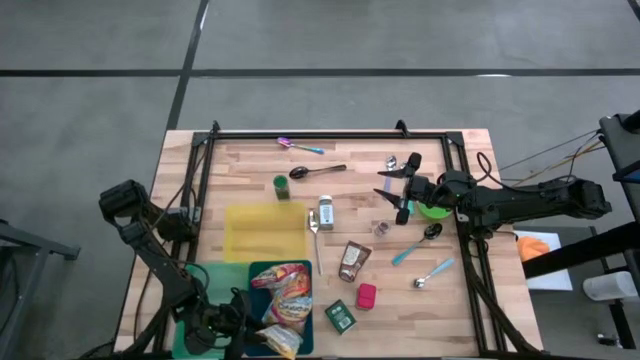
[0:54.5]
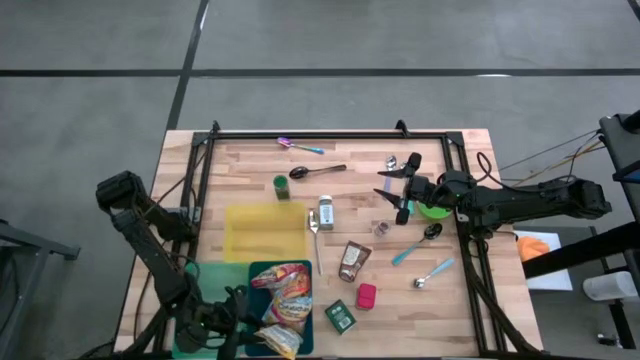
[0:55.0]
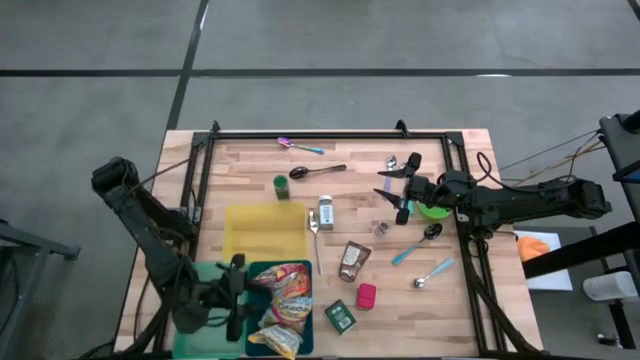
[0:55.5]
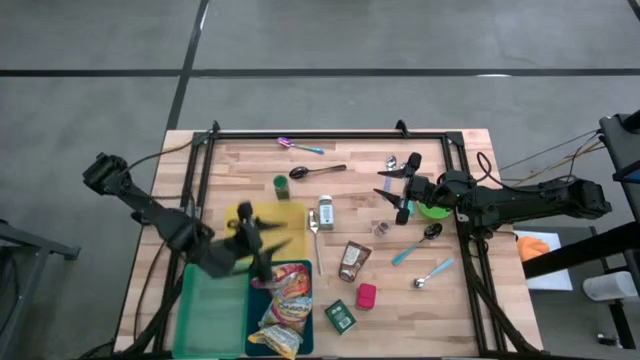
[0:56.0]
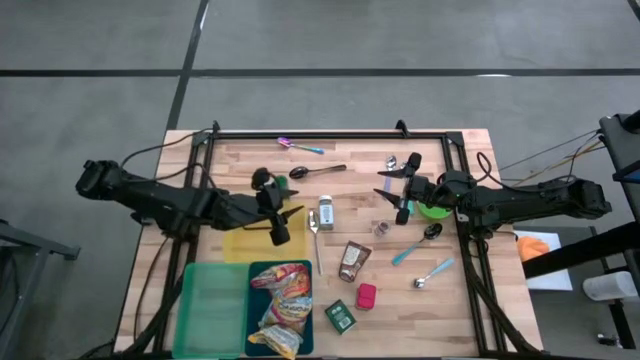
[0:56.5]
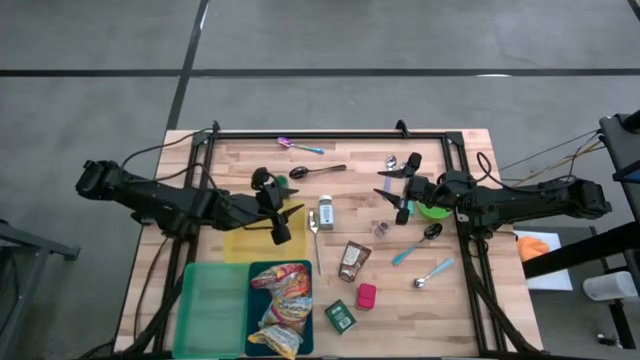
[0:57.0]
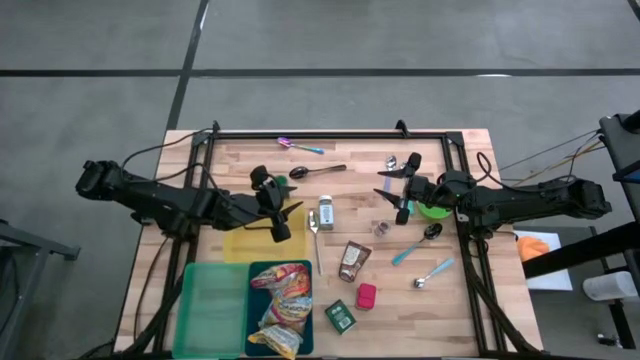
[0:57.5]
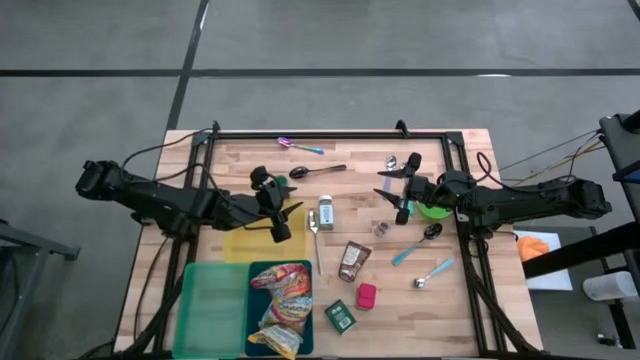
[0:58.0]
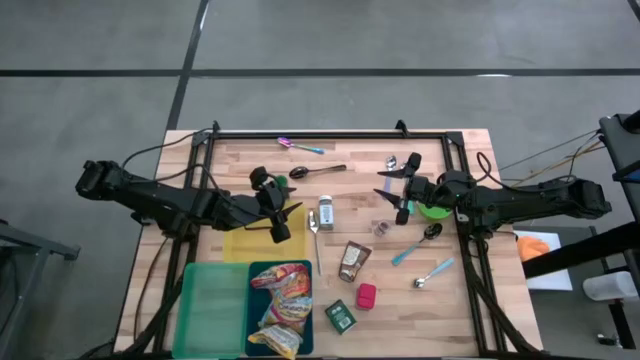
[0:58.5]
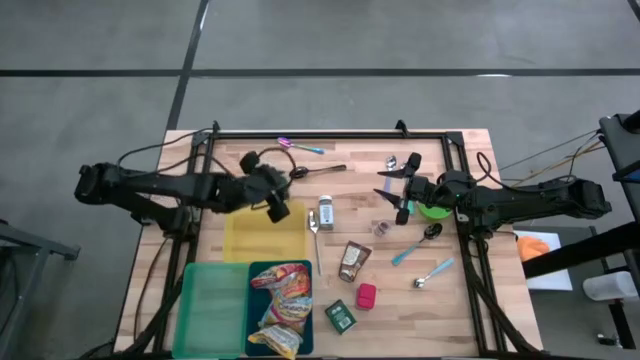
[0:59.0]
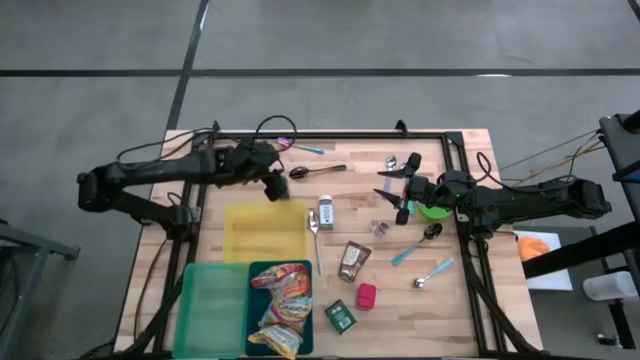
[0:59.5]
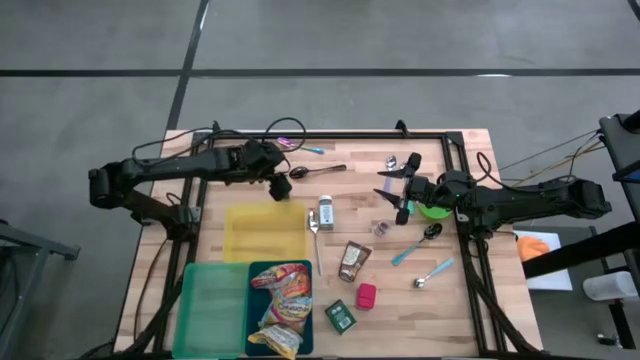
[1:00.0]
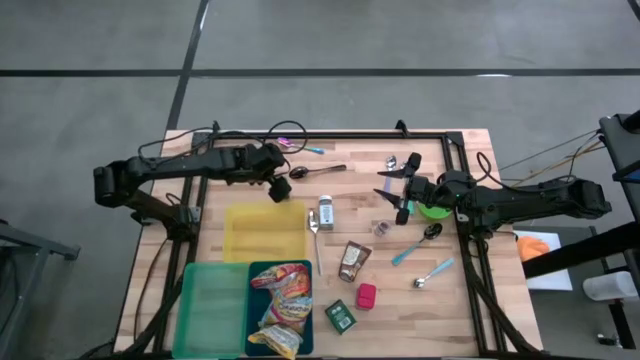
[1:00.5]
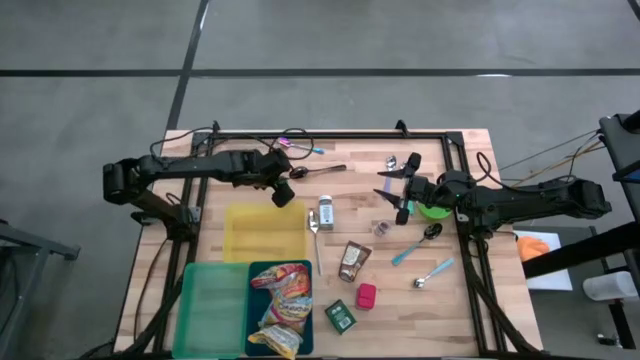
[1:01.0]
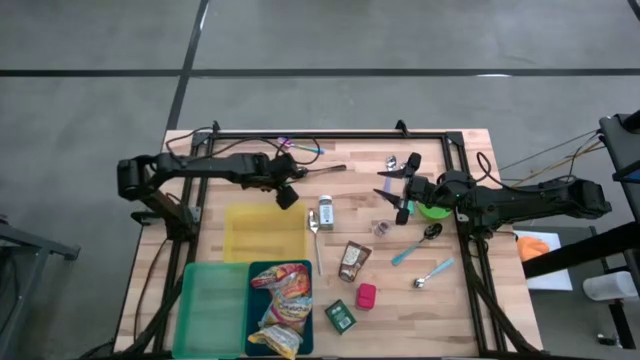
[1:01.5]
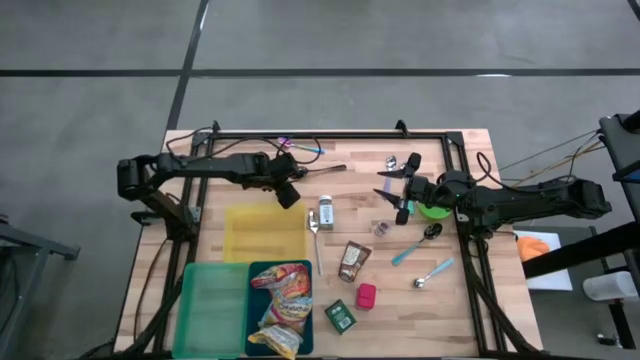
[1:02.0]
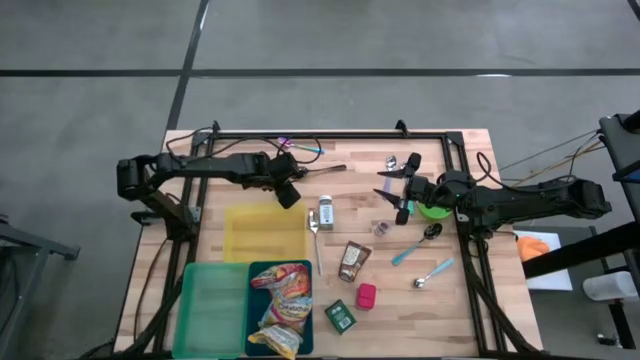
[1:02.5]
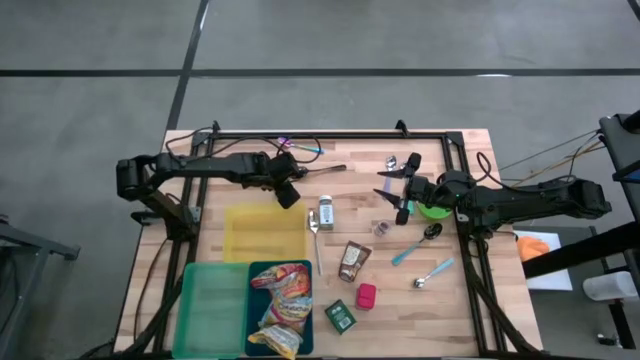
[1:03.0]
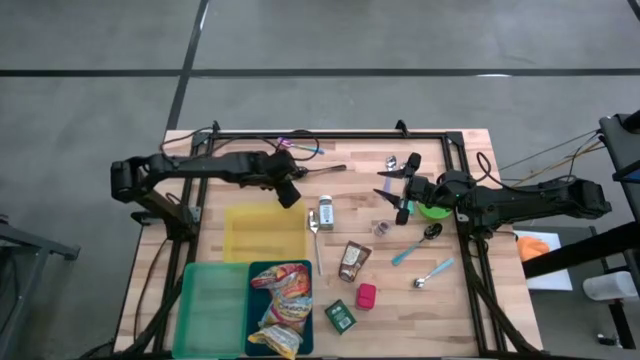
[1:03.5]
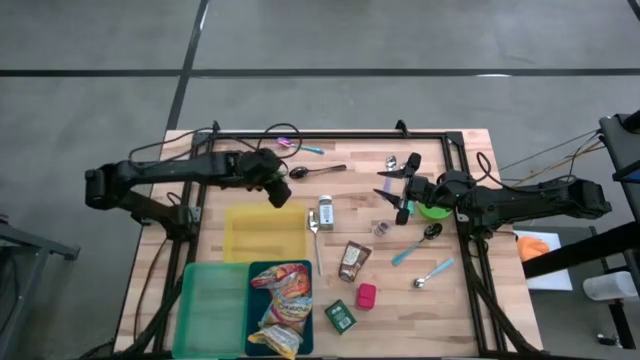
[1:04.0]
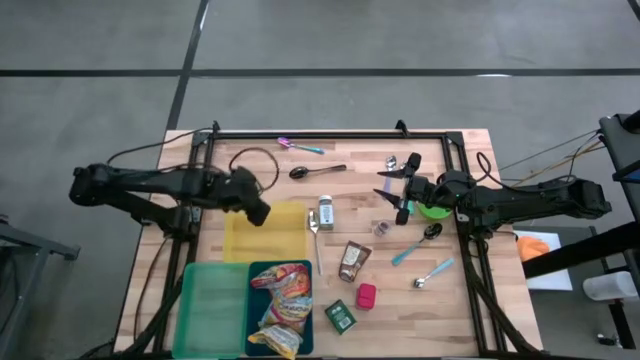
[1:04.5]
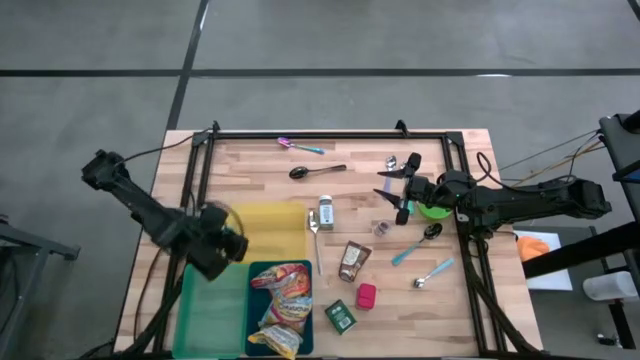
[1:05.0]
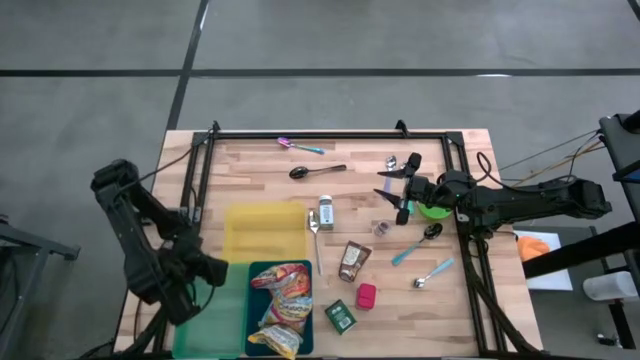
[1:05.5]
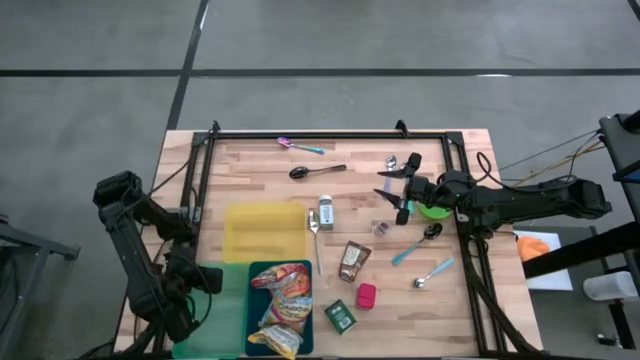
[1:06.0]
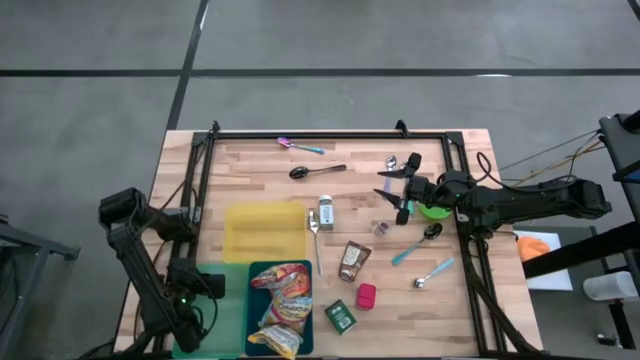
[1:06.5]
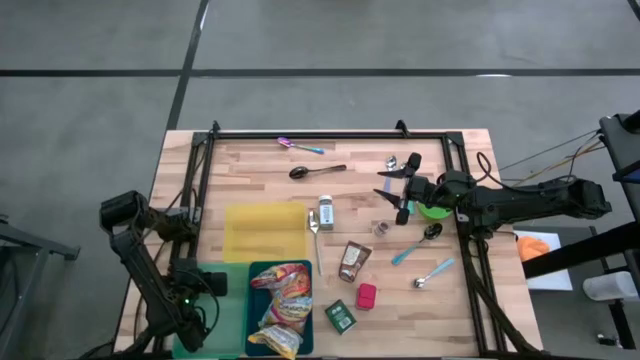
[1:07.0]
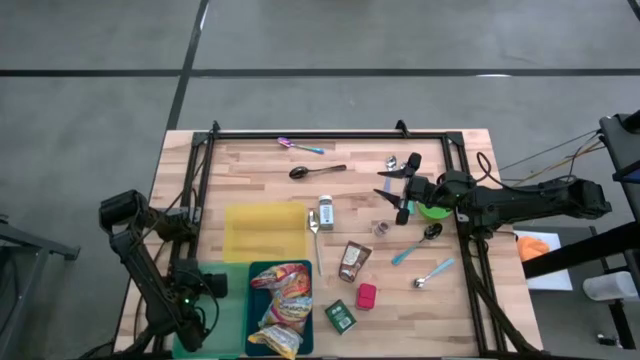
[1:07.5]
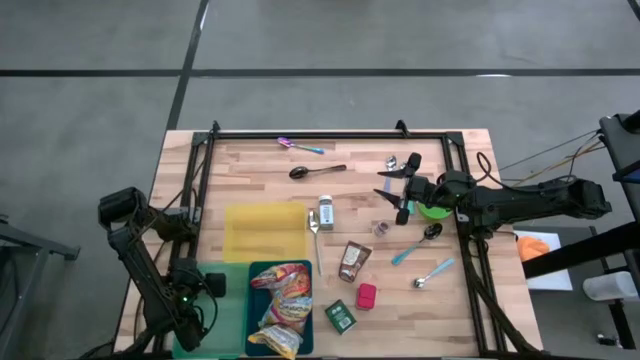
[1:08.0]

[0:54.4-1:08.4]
Put the green spice bottle into the green bin

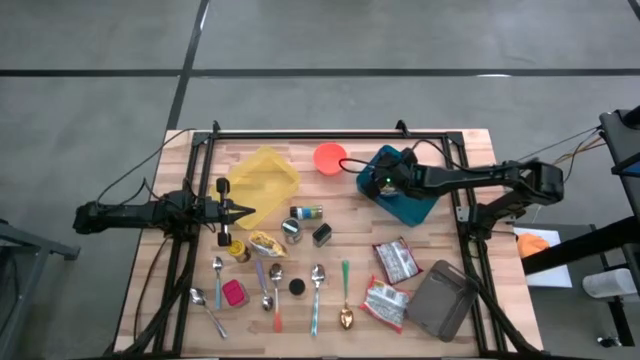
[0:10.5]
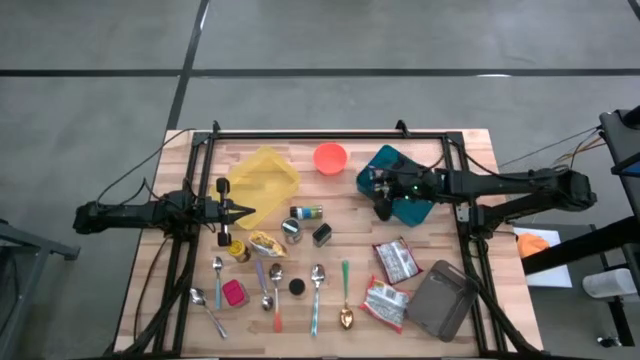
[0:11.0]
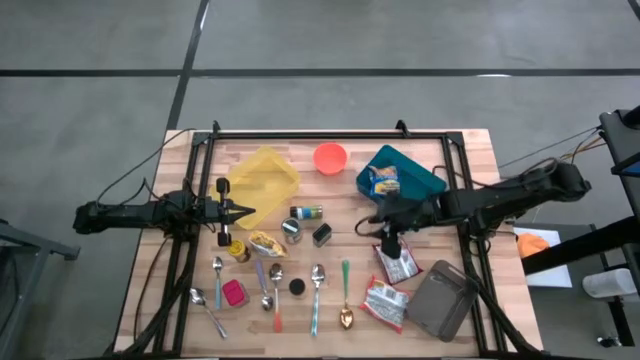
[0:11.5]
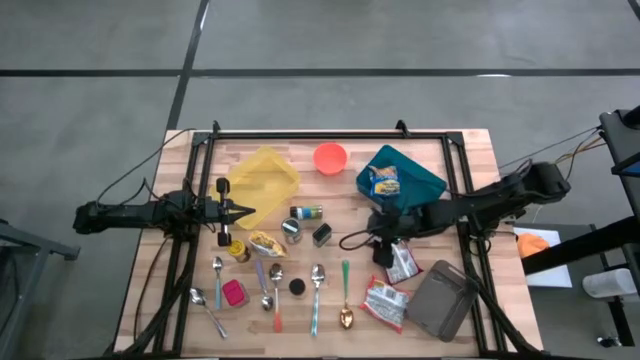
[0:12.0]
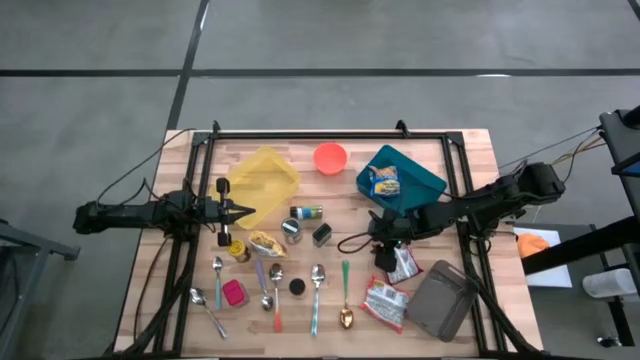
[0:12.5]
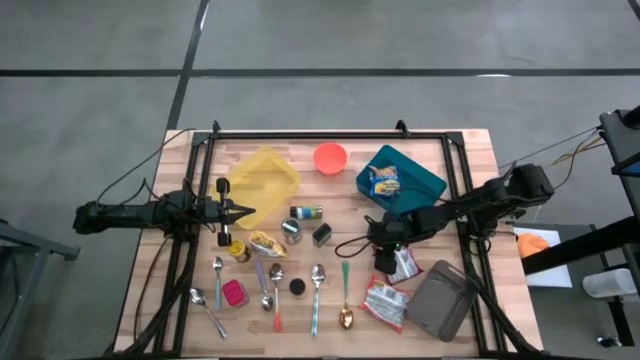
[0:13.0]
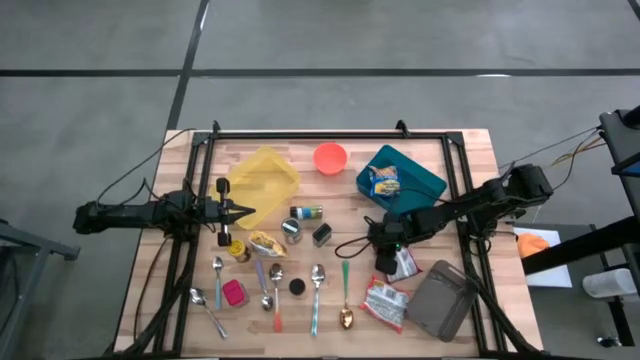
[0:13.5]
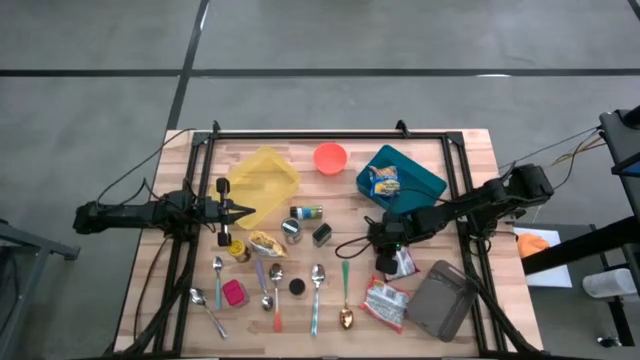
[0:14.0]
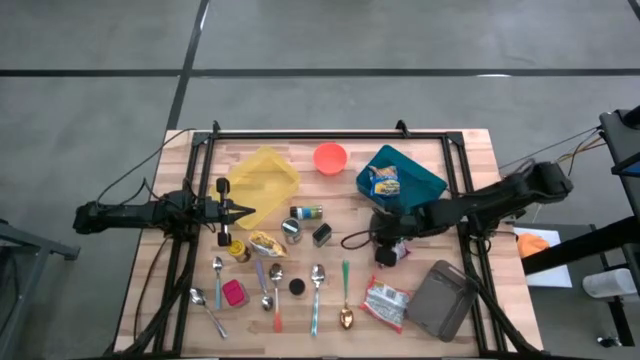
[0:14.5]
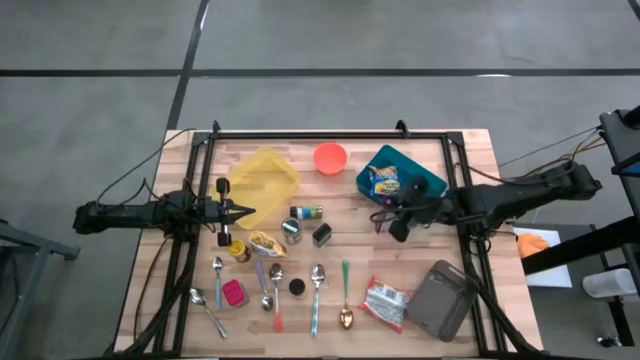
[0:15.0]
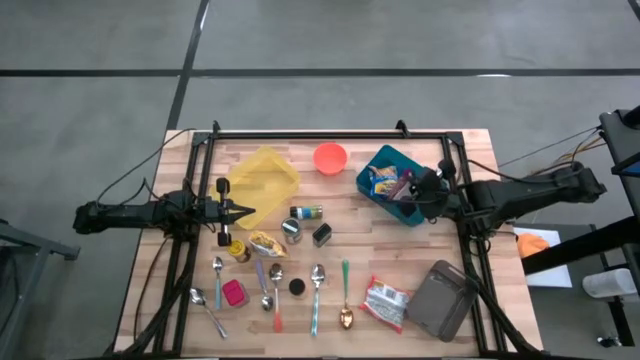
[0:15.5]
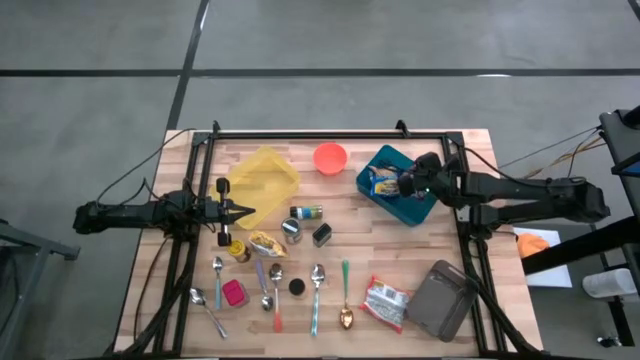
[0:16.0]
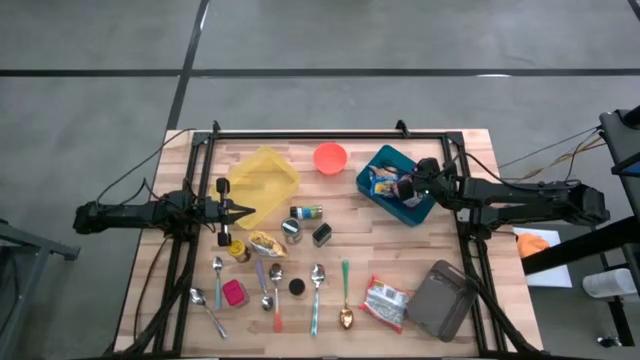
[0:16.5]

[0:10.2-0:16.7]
Put the red noodle pack into the blue bin
